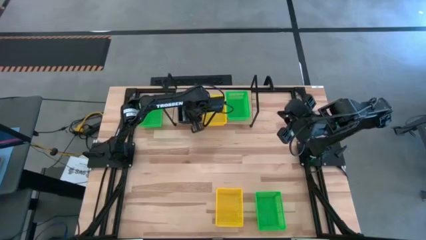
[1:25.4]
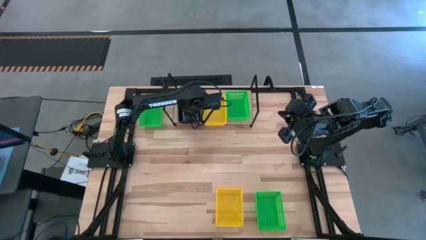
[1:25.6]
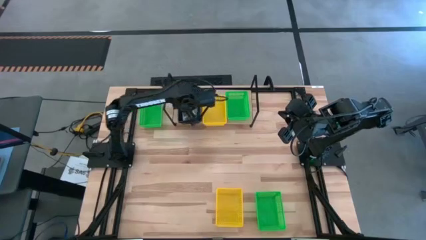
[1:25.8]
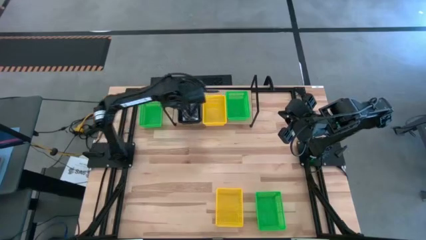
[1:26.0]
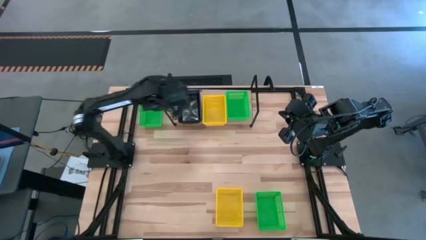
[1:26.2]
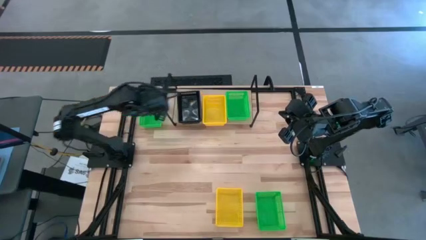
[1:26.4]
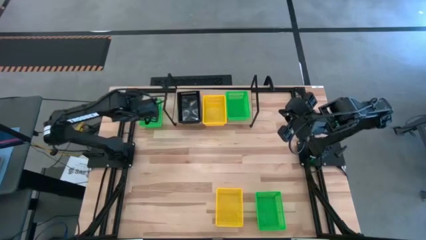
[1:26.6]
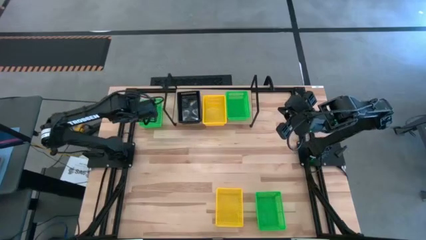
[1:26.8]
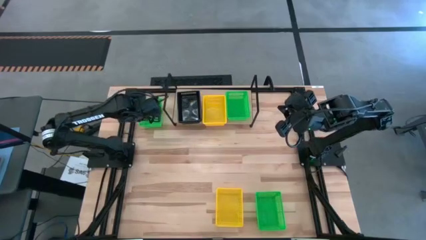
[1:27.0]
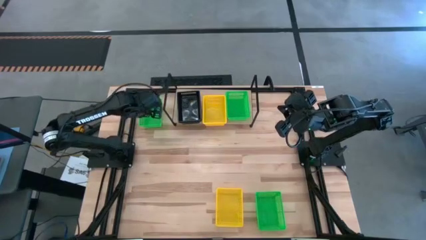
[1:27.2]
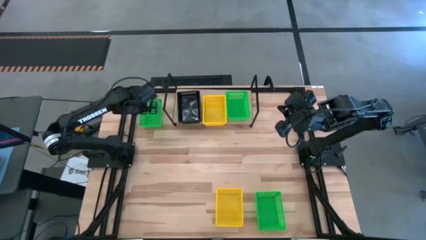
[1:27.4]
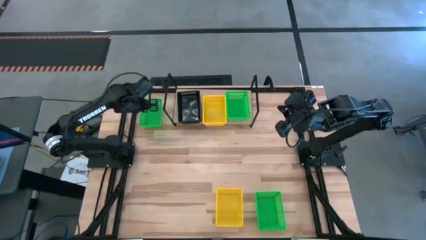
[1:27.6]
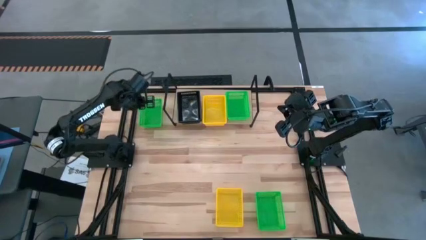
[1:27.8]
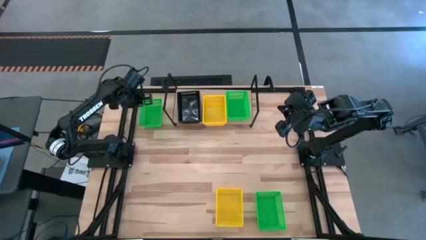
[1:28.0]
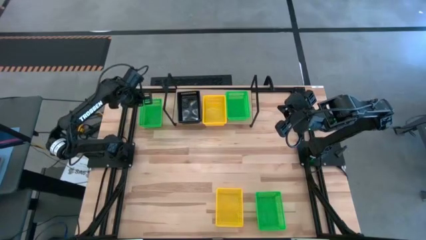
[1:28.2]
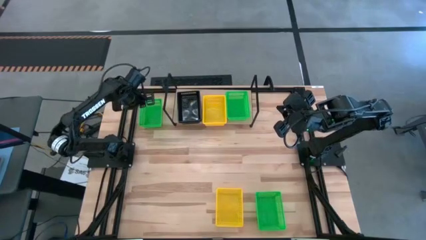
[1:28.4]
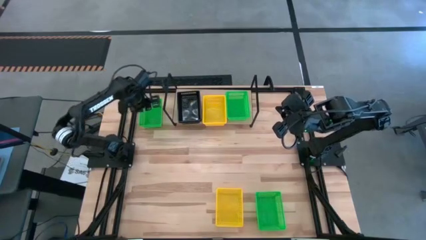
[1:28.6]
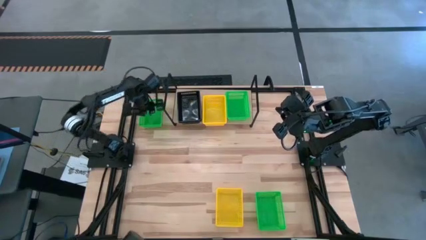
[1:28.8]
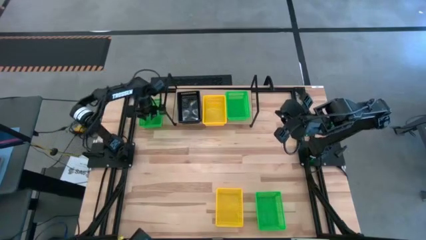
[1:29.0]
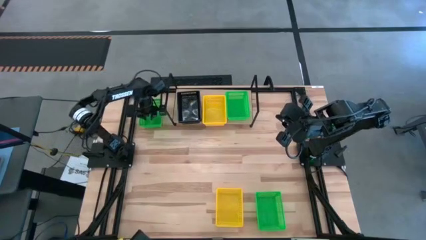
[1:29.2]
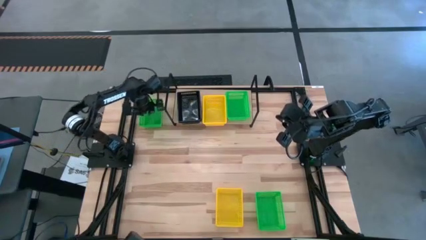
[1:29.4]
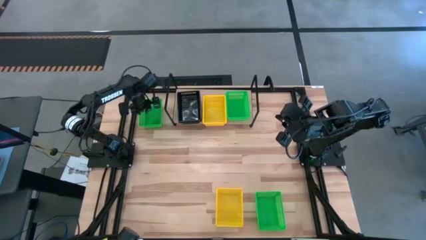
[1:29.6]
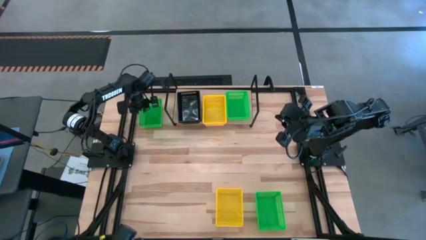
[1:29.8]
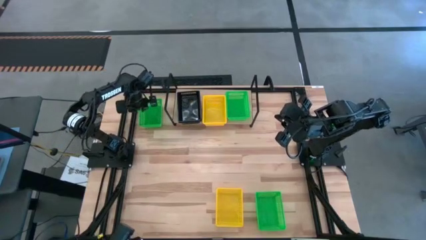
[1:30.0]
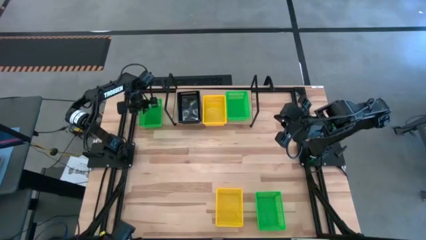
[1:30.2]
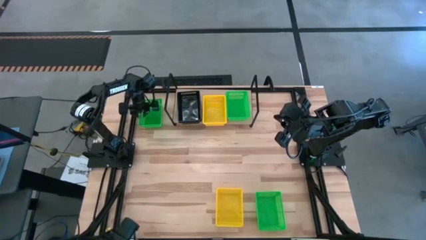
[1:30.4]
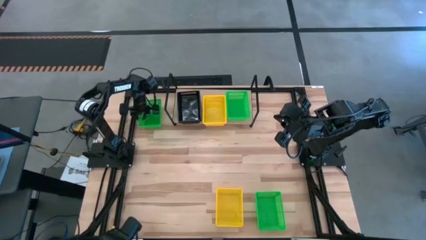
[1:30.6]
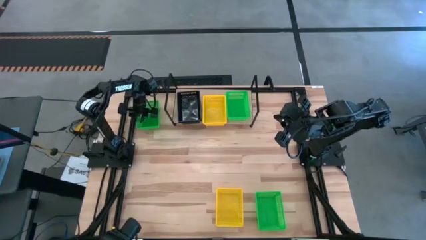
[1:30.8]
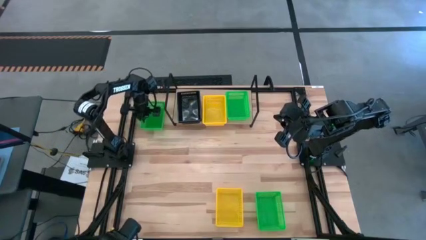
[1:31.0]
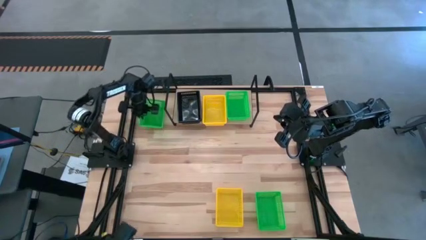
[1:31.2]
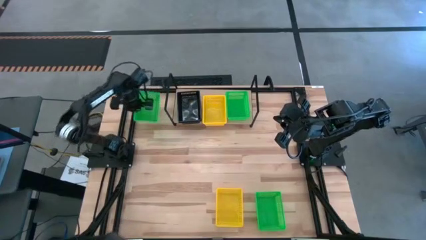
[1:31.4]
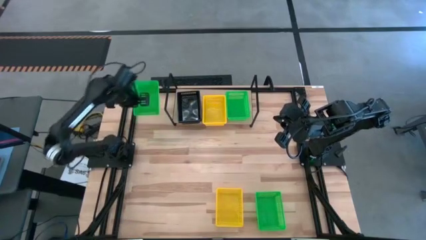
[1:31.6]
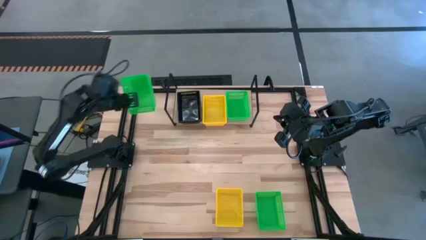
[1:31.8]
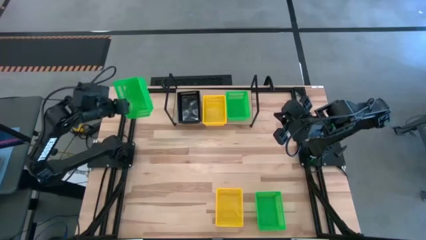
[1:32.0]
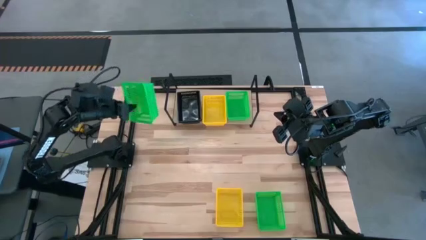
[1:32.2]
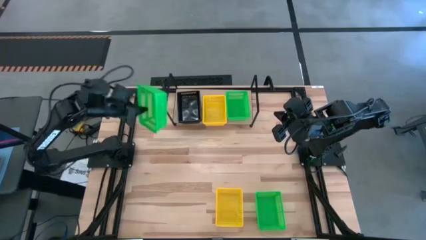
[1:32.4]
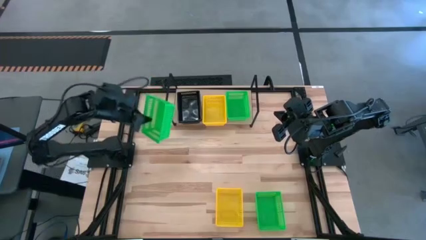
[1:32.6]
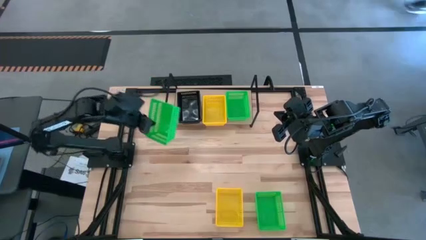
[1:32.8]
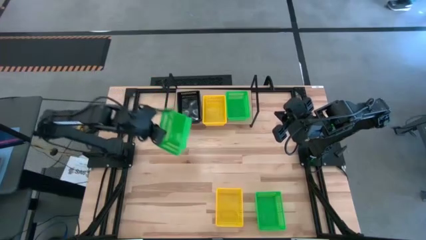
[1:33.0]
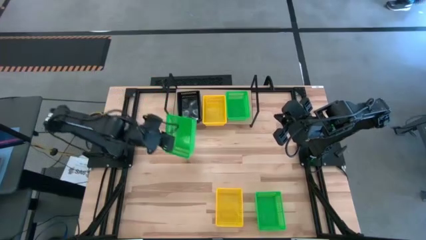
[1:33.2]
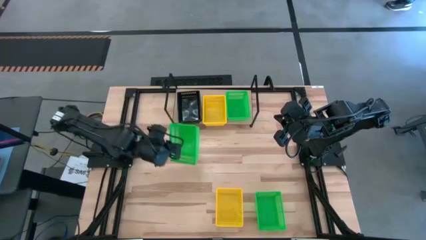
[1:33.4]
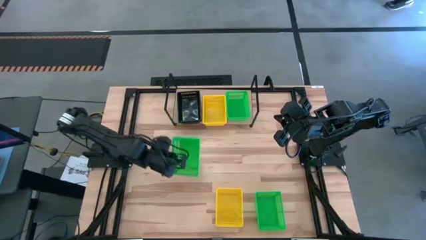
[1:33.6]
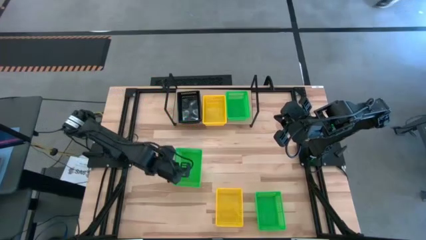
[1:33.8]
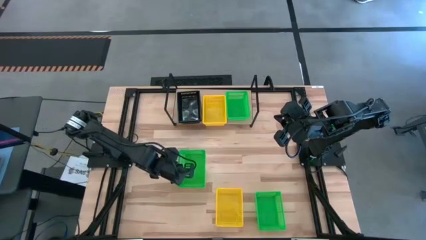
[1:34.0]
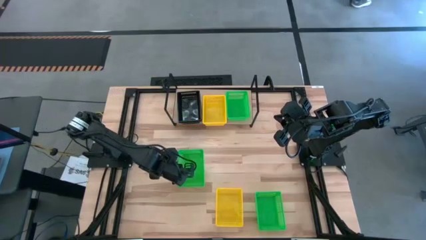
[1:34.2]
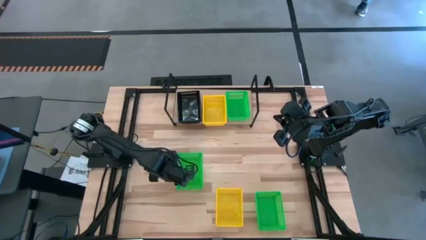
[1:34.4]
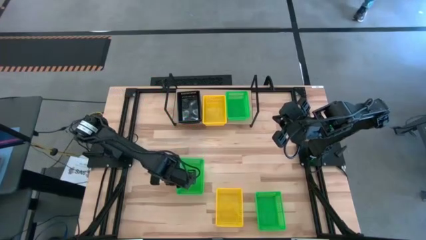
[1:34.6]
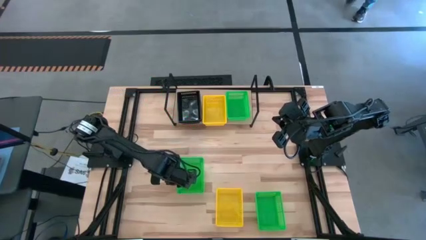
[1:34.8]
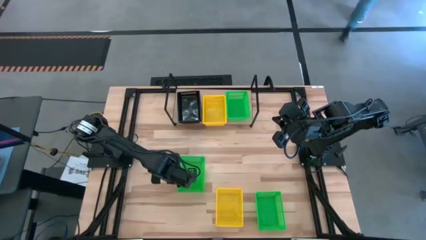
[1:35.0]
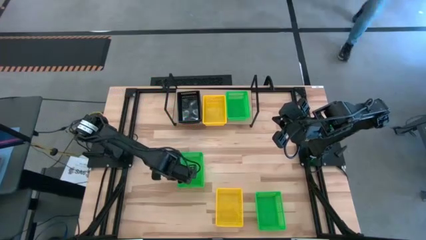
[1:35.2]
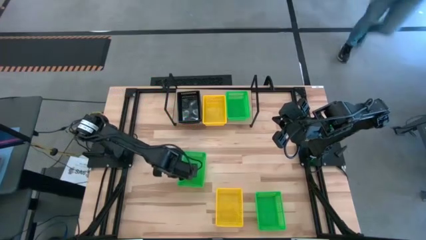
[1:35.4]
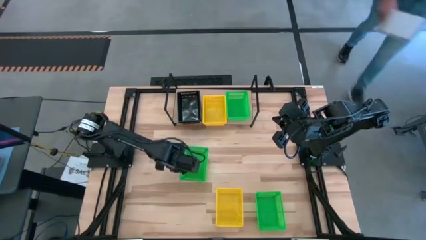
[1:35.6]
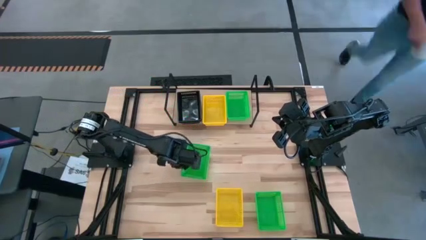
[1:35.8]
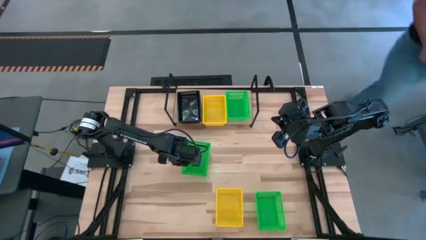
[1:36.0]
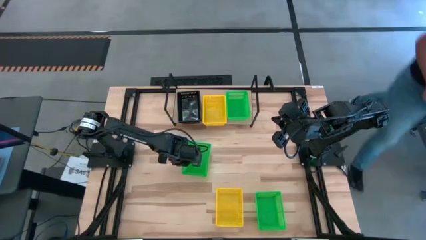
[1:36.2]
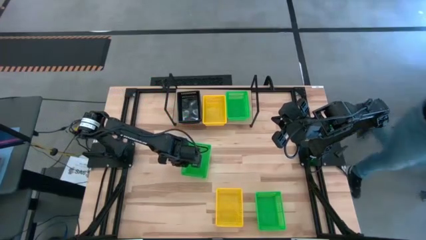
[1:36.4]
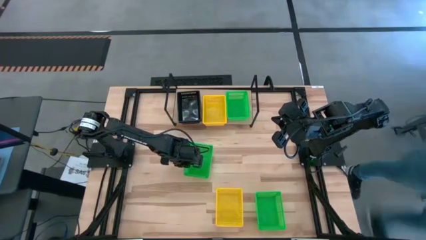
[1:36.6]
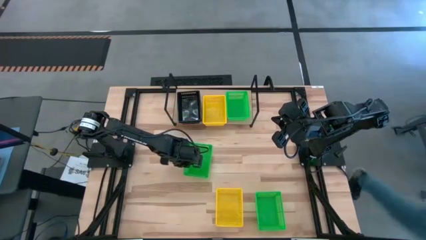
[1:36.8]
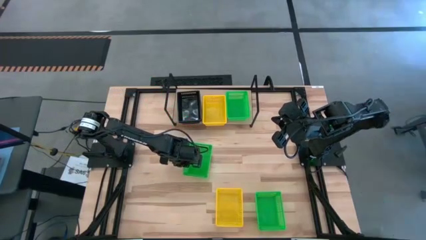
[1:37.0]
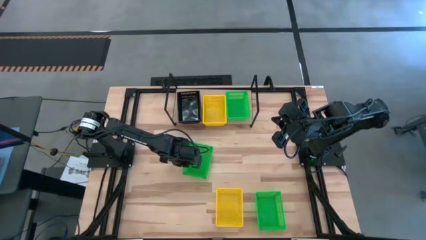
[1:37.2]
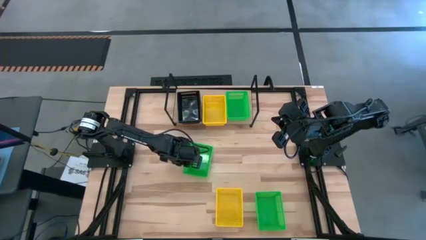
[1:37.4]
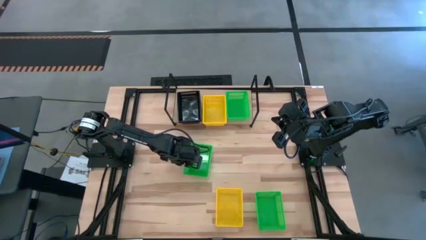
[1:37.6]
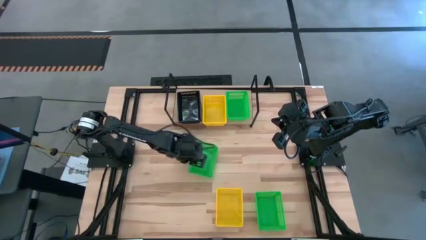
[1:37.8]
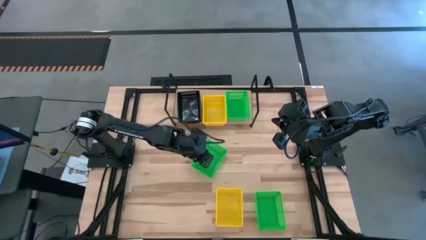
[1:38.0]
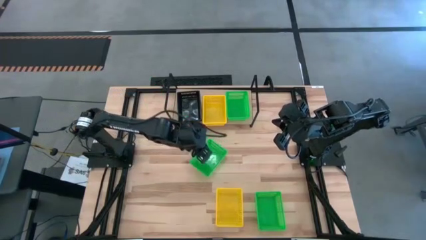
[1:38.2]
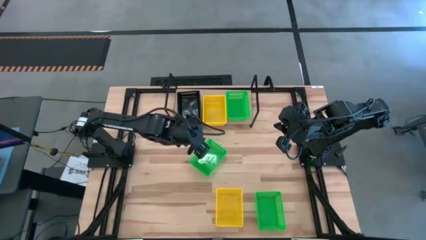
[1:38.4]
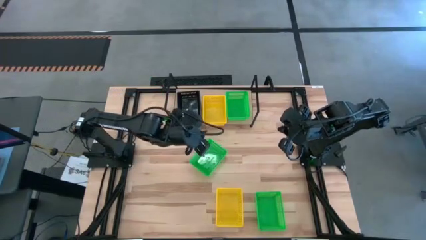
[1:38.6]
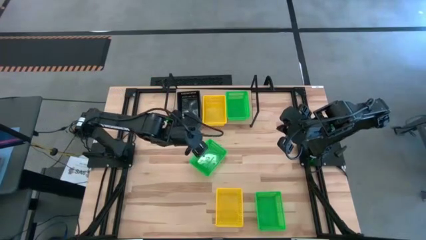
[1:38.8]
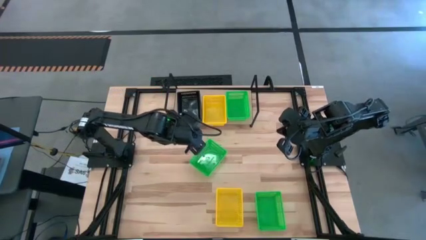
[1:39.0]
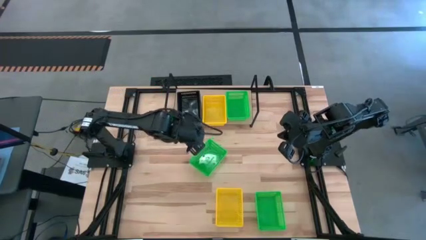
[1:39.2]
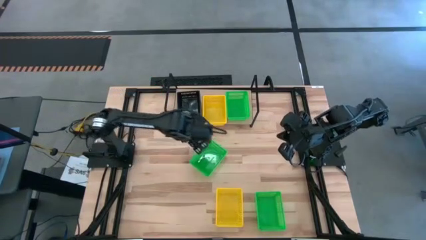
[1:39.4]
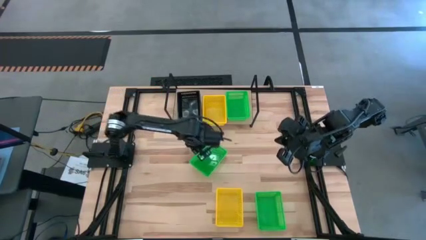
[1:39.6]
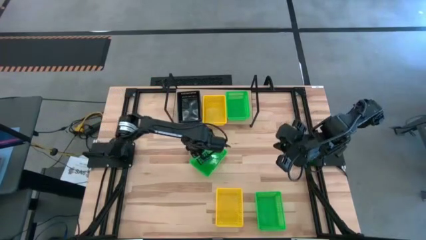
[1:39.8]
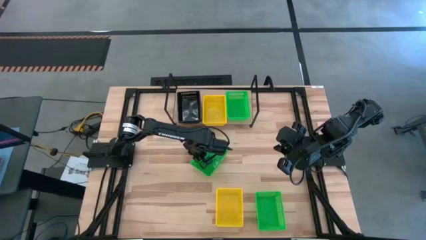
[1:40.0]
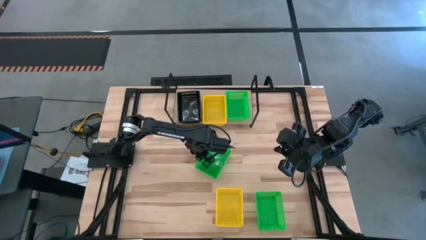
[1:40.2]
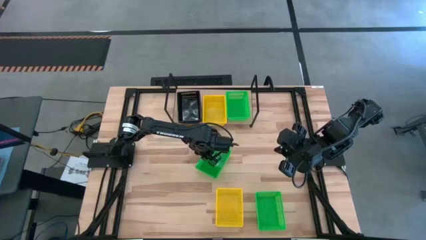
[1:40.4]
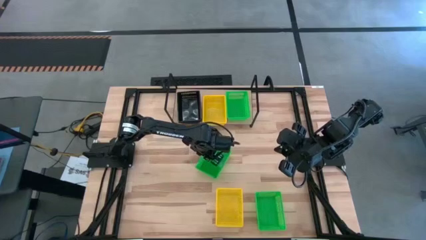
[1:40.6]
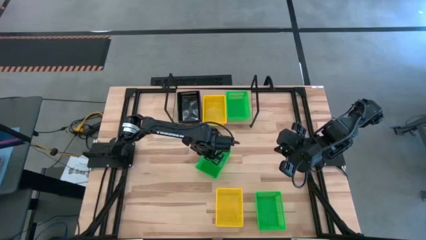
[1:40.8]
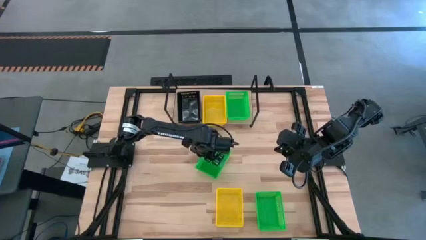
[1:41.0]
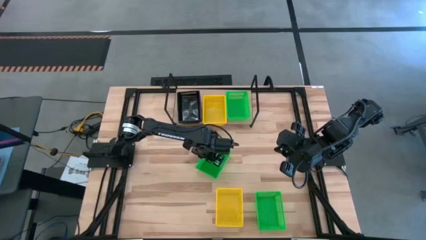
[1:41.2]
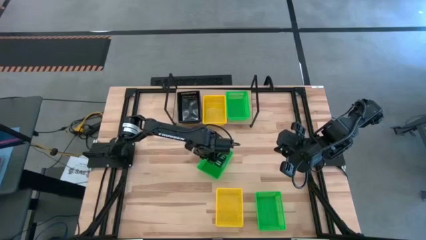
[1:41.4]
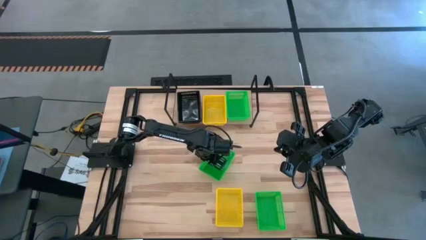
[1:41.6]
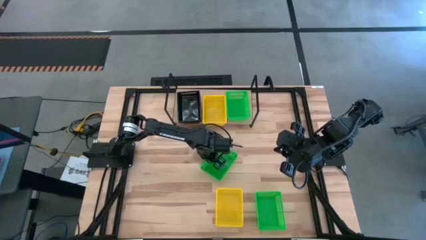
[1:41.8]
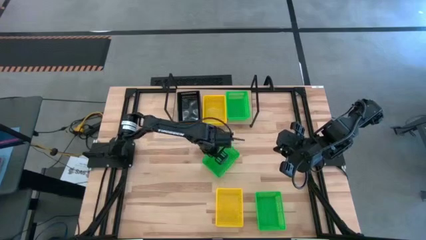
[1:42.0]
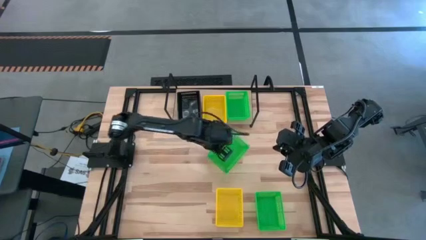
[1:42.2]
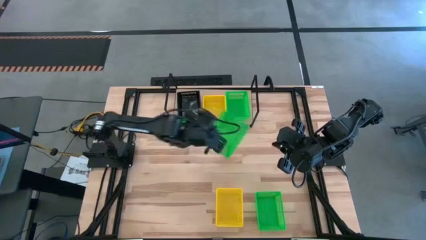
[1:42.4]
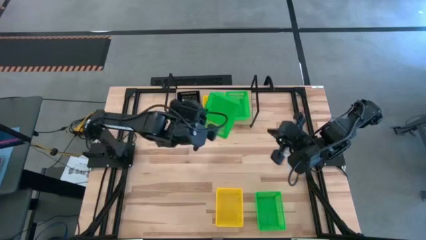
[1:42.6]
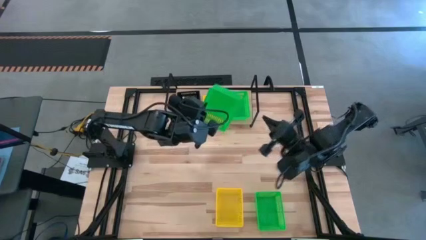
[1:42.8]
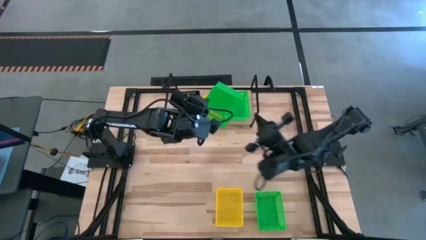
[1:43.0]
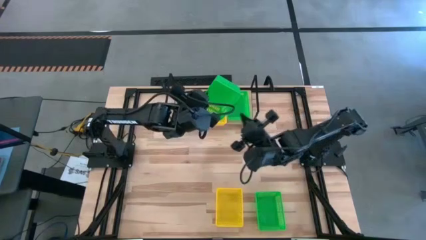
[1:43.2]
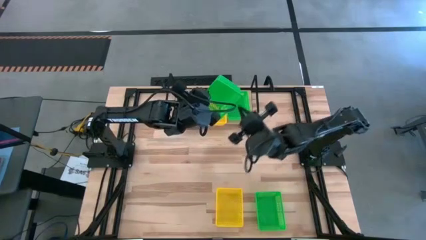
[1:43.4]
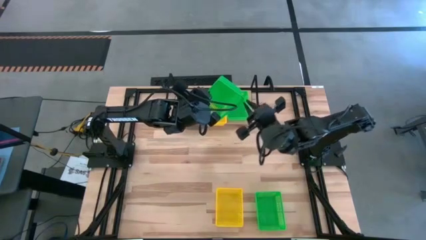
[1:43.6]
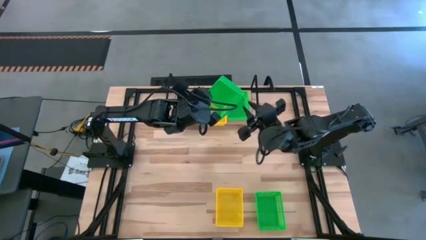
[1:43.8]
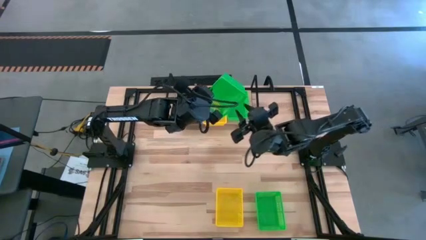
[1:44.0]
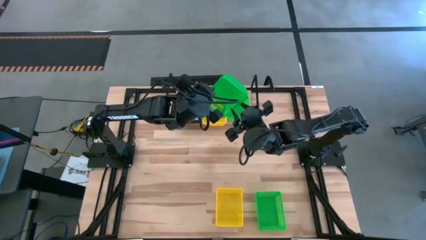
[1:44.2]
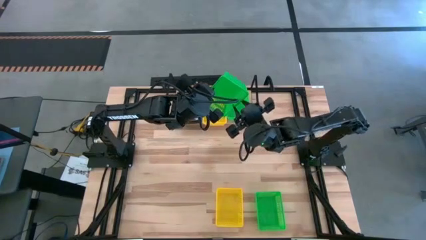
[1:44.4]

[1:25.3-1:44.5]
Task: Stack baskets on shelf by color
Stack the top green bin on top of the stacked green bins on the shelf
